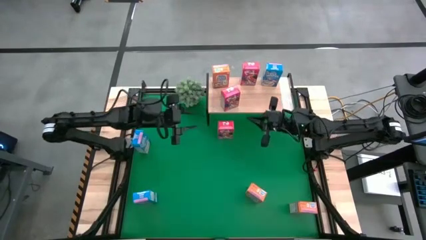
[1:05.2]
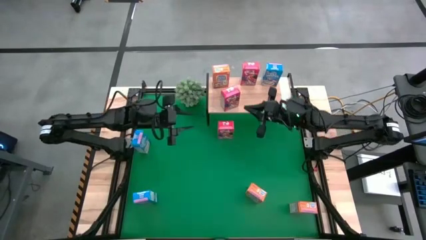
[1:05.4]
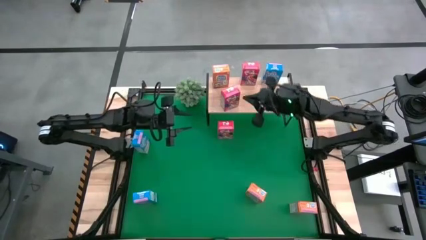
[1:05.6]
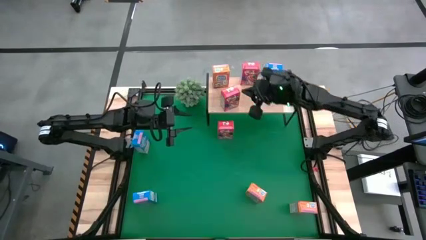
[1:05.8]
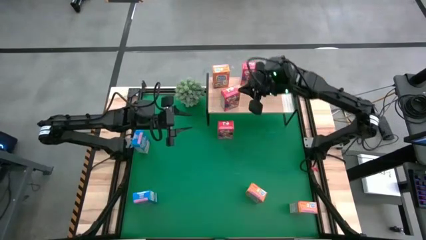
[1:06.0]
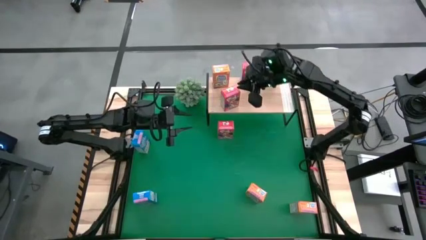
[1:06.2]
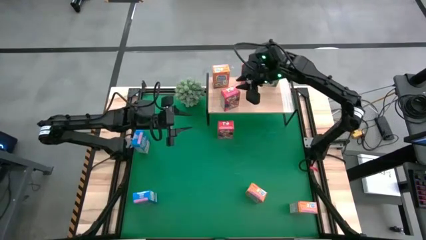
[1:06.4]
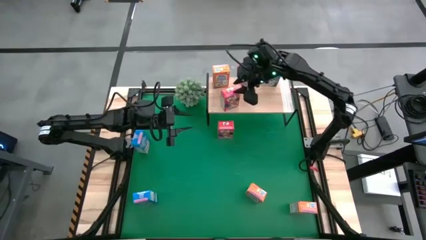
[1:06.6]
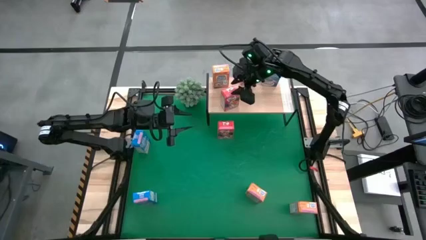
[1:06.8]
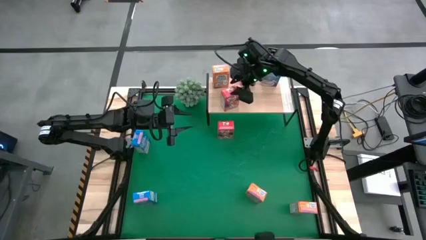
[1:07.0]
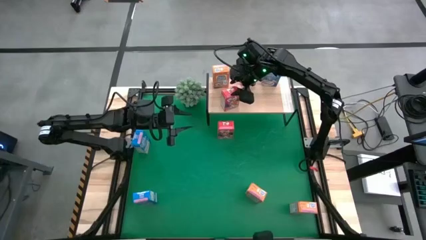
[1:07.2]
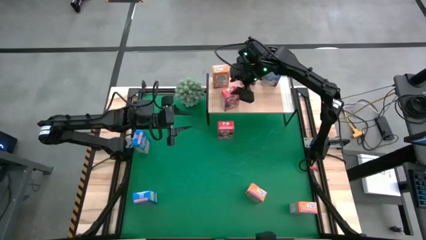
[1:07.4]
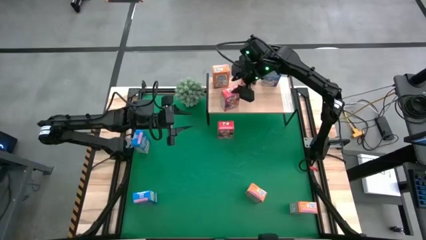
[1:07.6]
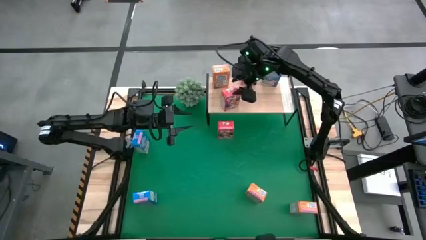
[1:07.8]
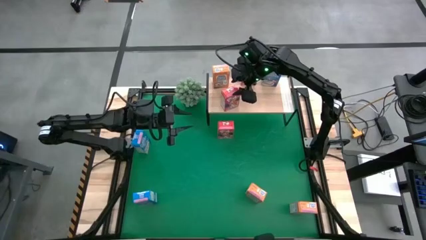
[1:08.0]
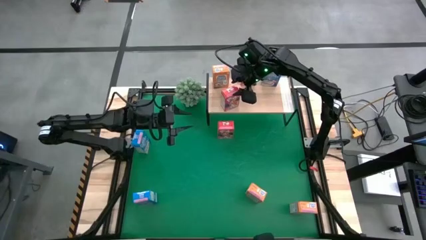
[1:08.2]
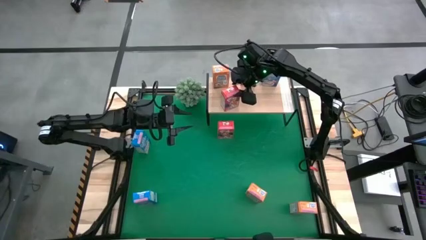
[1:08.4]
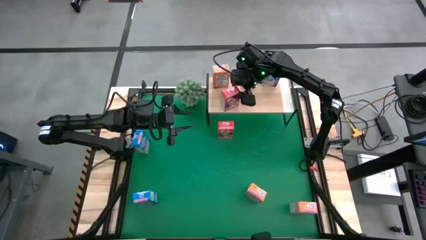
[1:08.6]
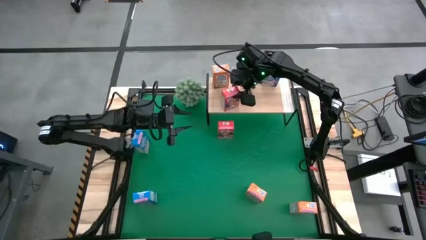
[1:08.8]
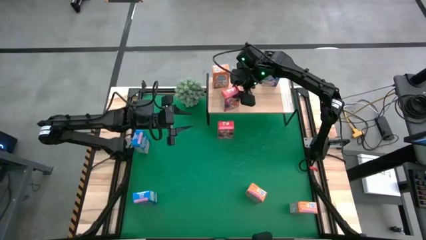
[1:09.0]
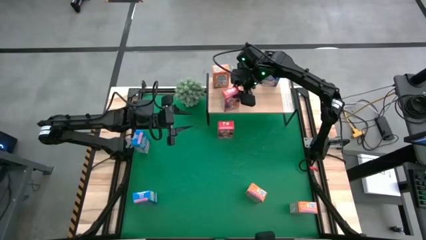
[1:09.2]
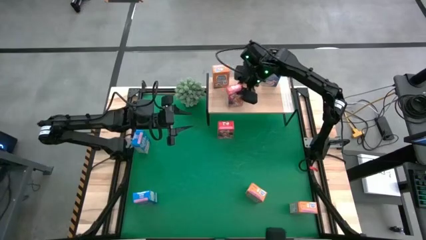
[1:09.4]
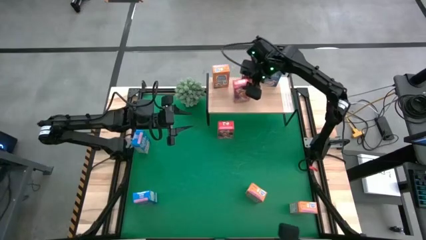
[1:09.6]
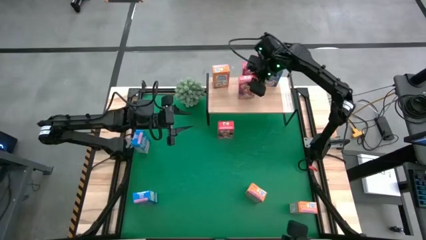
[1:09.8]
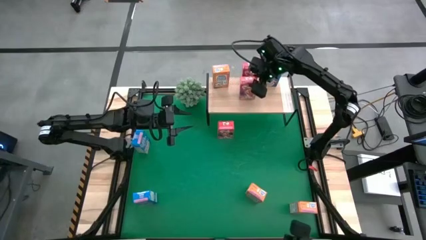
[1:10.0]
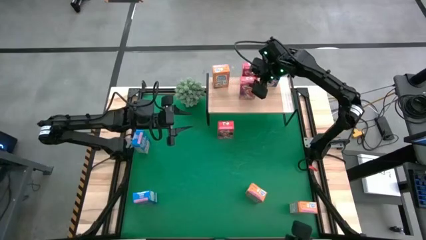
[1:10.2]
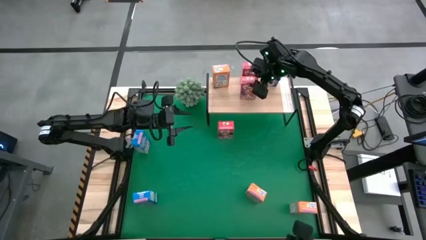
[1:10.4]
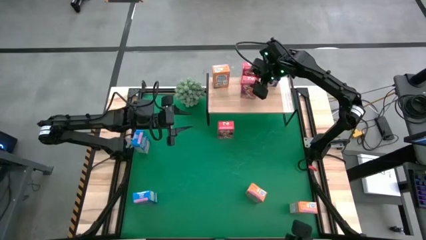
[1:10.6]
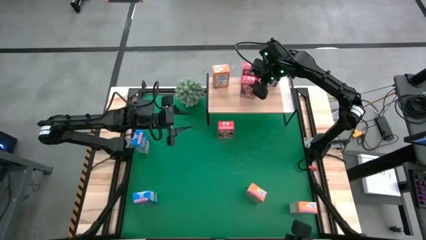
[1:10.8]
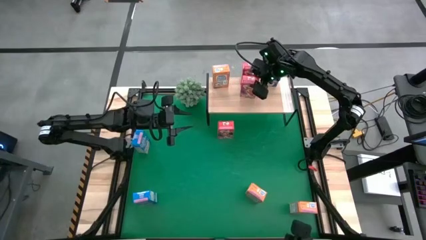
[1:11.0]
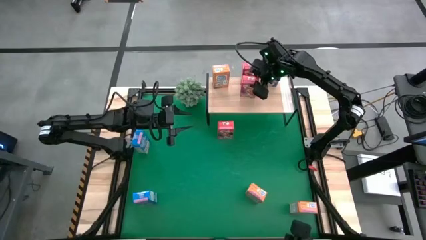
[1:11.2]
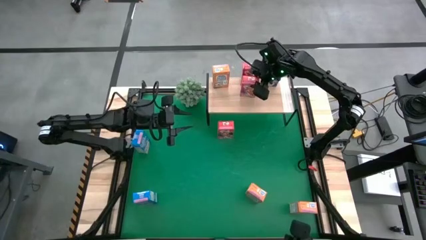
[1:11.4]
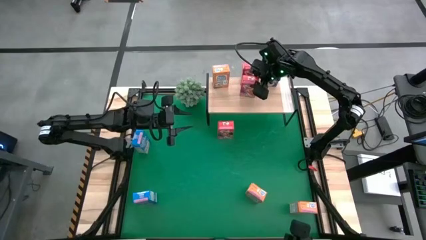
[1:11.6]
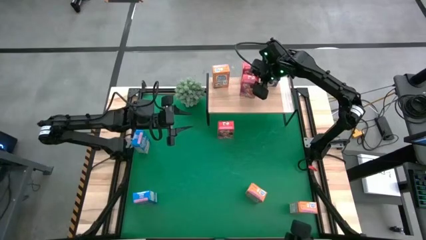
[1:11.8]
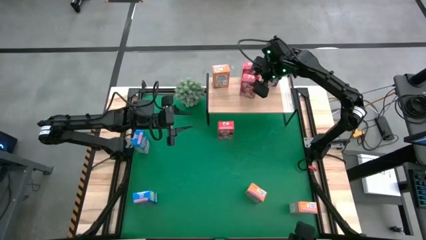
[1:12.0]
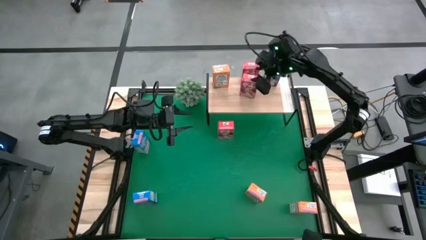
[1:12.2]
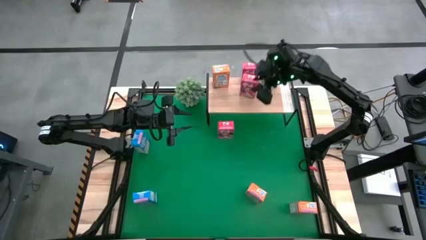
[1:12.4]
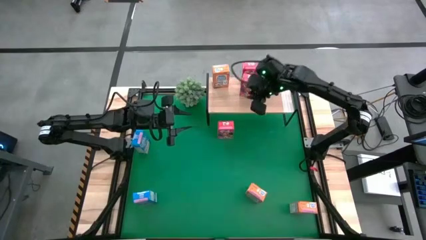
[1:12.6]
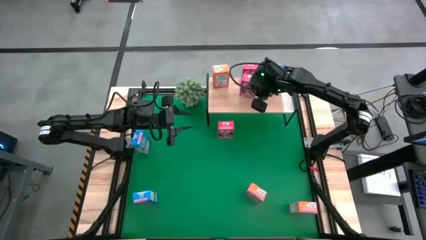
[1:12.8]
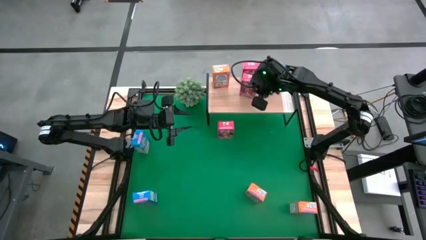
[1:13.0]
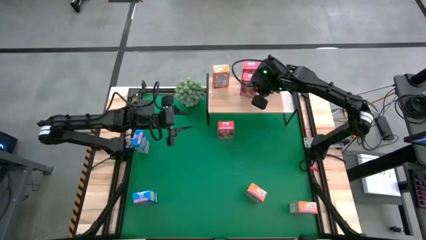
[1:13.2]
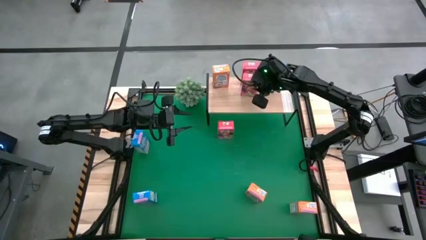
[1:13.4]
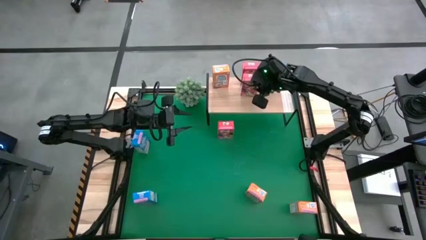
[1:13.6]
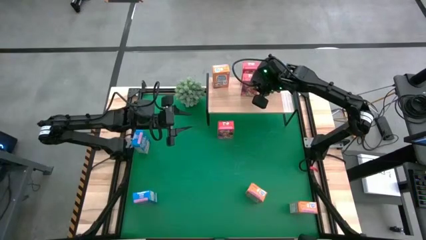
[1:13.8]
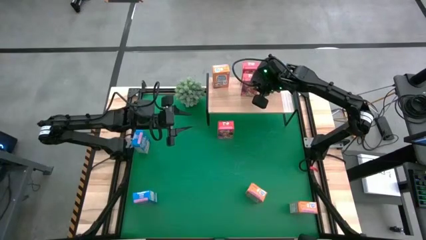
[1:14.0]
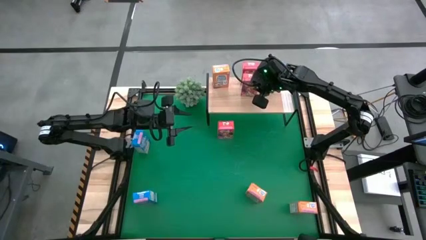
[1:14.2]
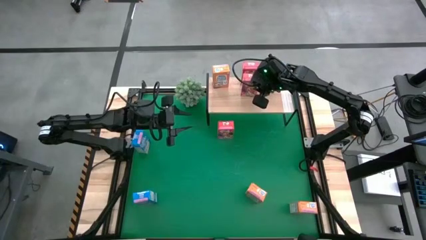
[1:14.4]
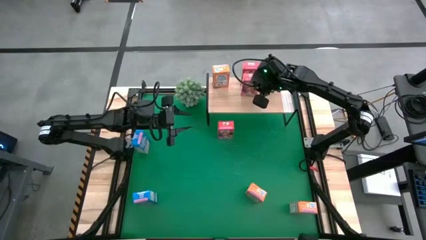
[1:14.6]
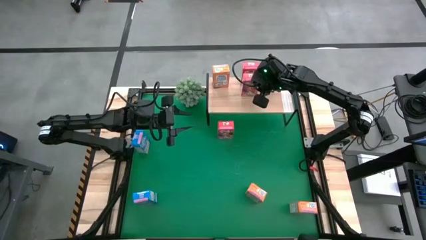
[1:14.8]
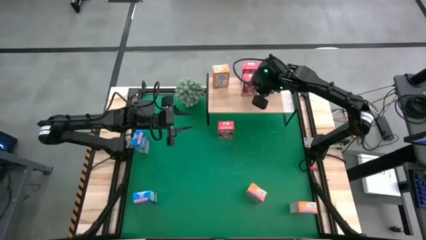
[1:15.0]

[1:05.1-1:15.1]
Task: Stack cereal on shelf
Put the left red cereal box on the shelf aligned with the other red cereal box

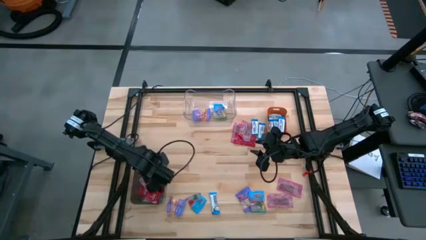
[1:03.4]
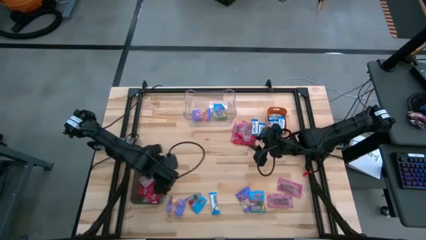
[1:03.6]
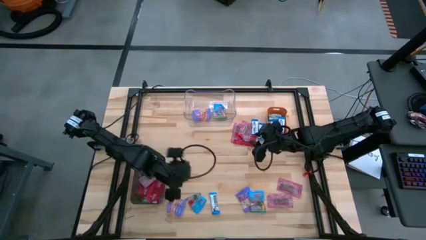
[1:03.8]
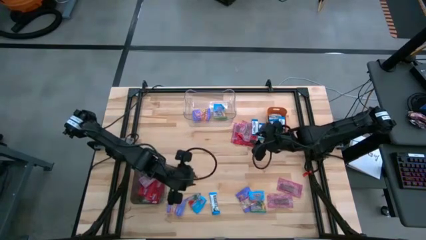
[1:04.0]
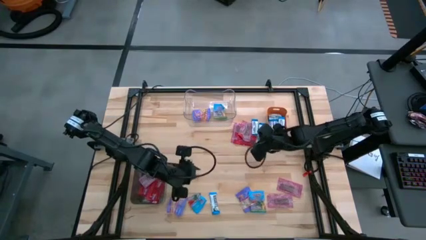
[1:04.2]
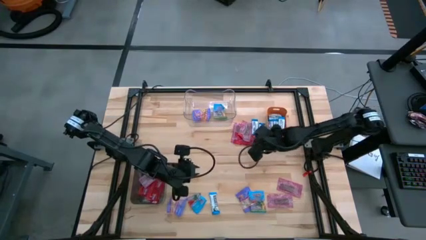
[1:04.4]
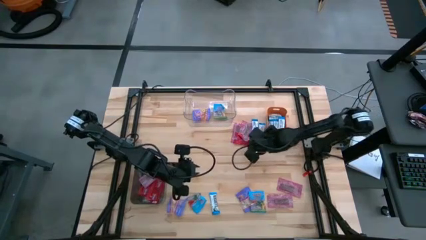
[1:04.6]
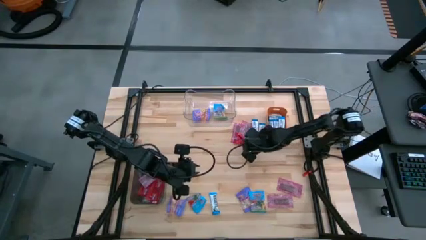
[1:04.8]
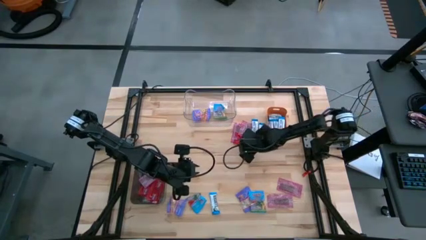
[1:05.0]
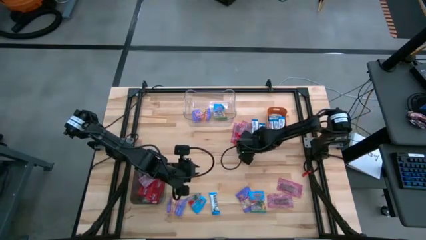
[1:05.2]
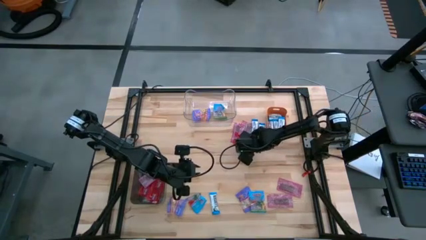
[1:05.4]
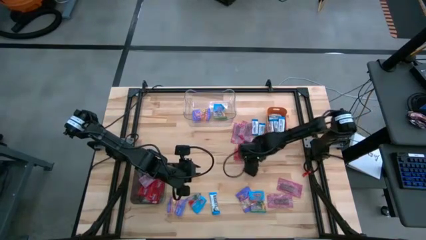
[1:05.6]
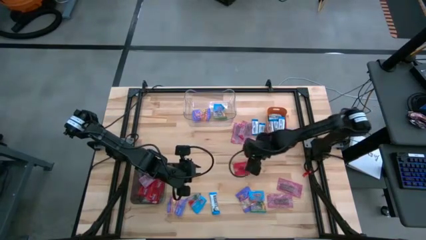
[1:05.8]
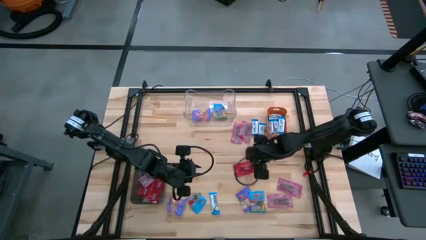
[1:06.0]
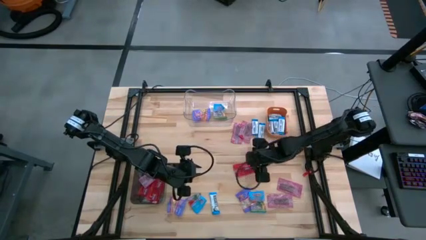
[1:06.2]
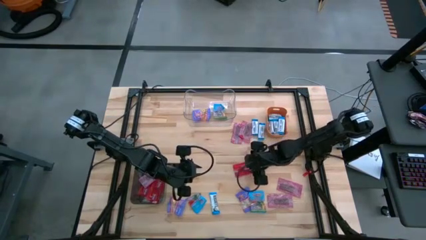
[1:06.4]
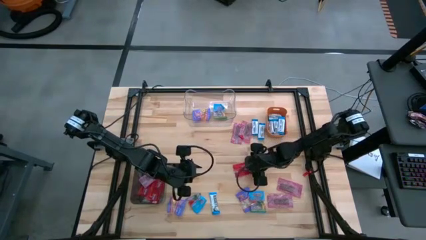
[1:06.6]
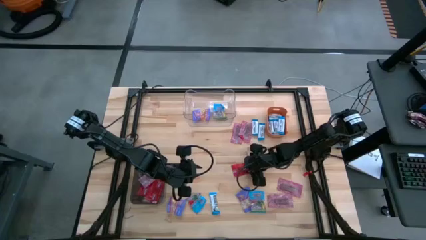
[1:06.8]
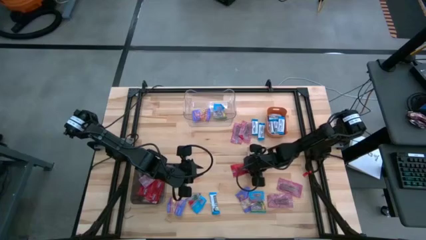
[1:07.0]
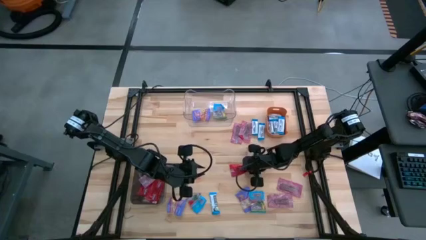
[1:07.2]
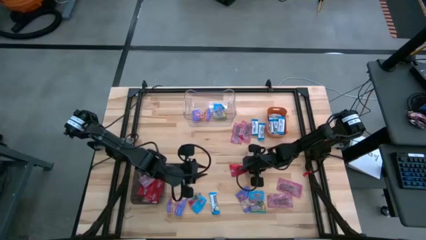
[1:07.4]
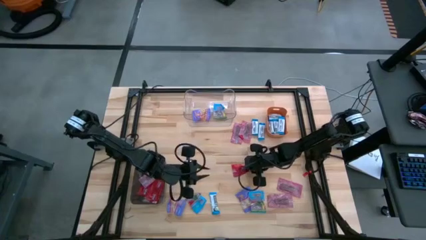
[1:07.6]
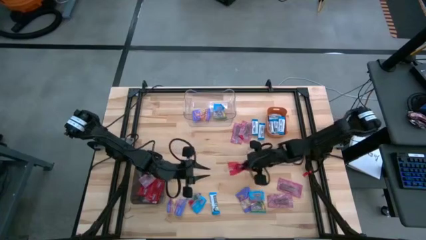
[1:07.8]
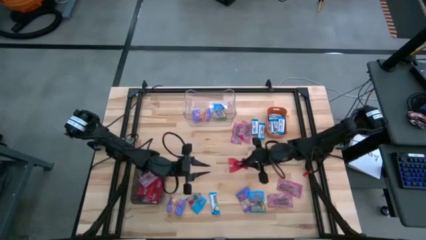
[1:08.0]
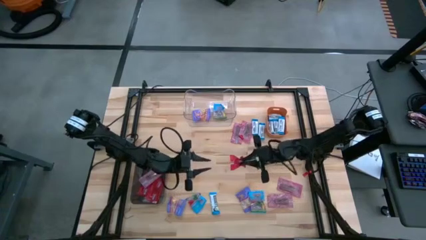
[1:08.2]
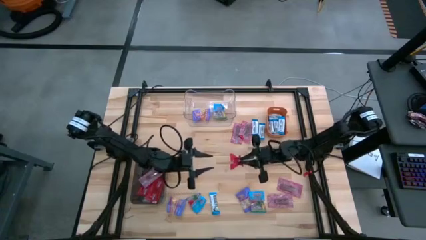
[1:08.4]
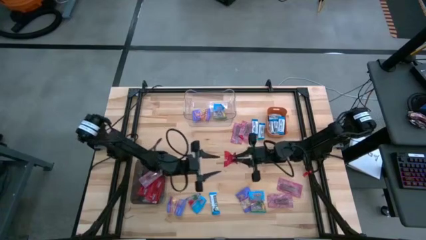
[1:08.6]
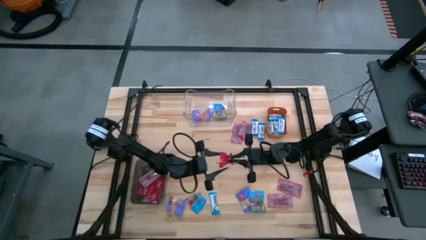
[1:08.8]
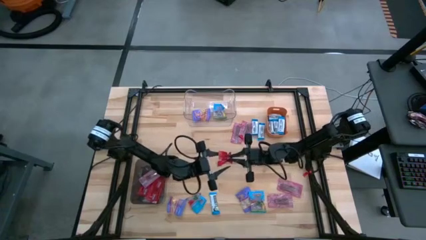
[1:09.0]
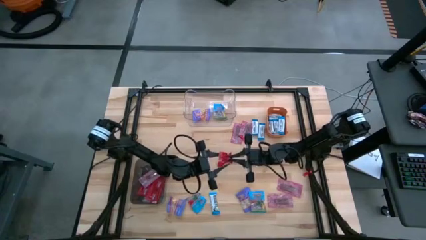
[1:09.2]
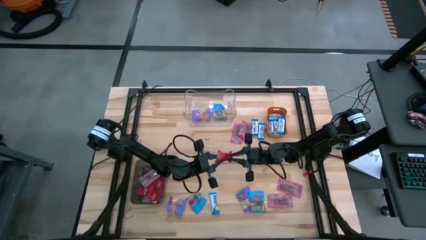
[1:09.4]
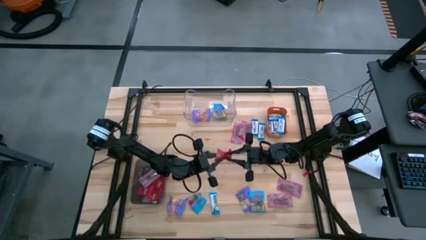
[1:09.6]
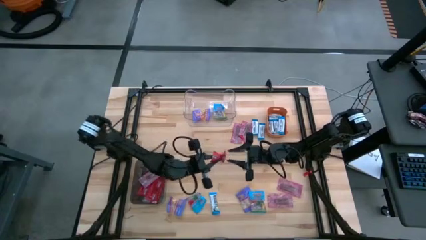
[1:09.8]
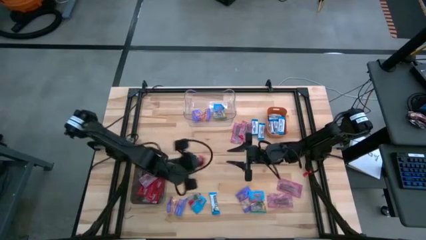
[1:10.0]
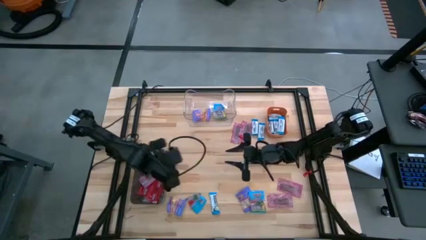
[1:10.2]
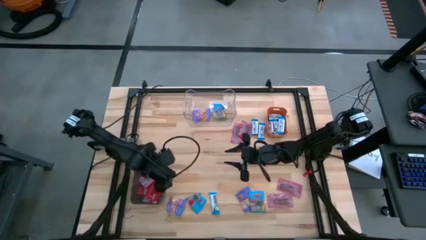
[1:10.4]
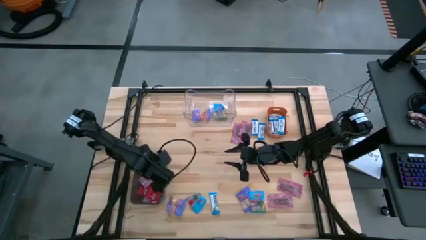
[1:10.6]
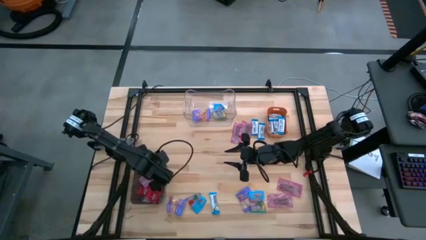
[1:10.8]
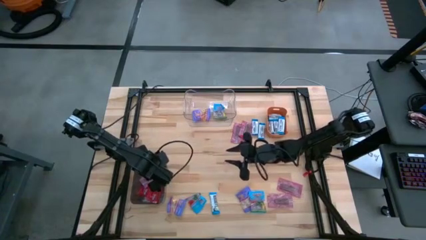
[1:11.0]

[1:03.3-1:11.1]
Task: Sort candy
Put the red candy into the black bin
